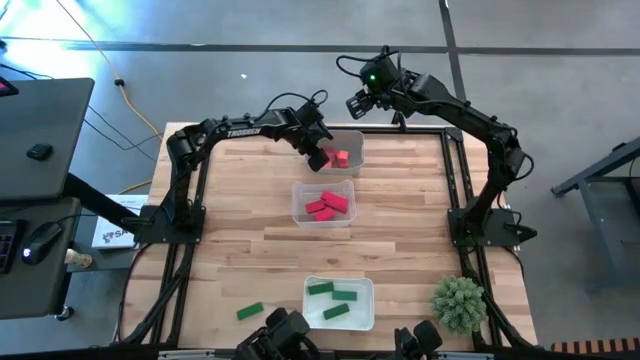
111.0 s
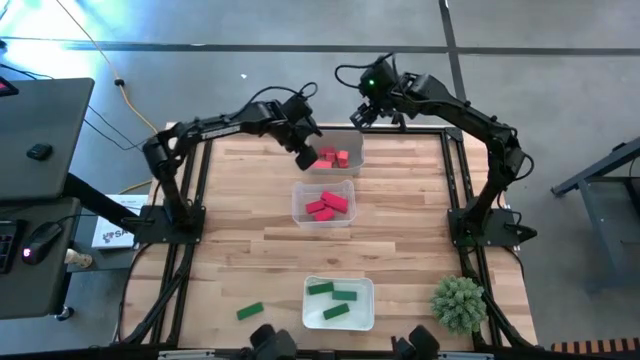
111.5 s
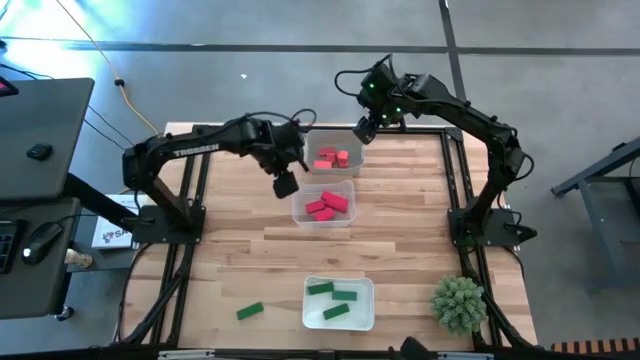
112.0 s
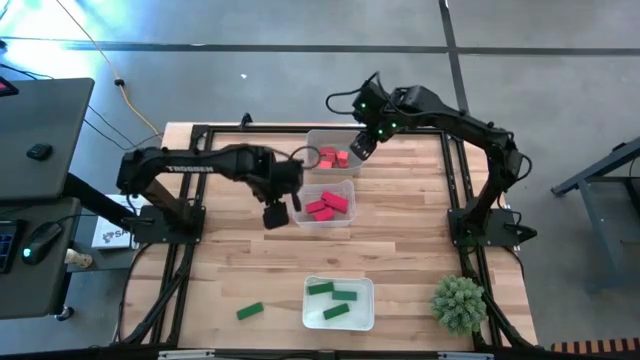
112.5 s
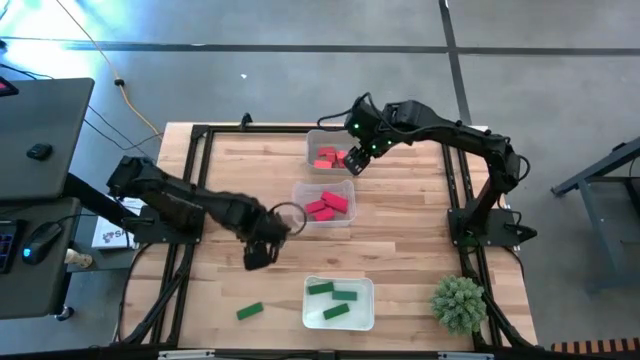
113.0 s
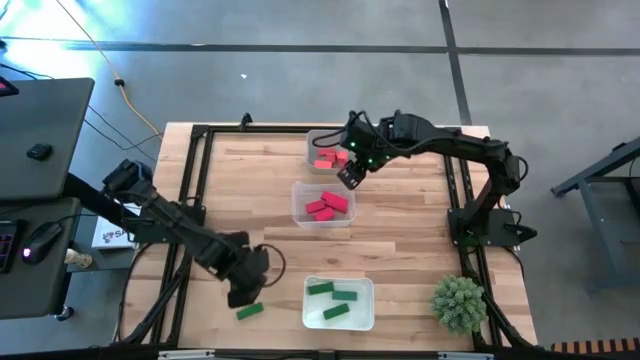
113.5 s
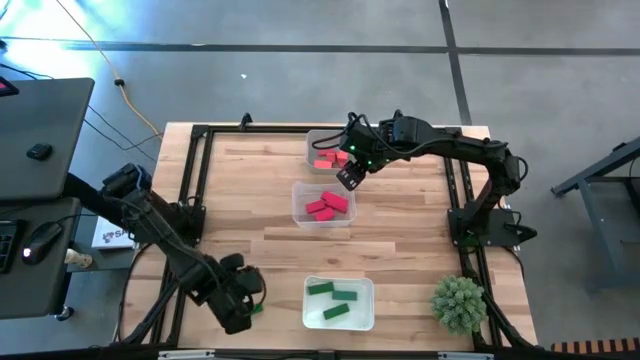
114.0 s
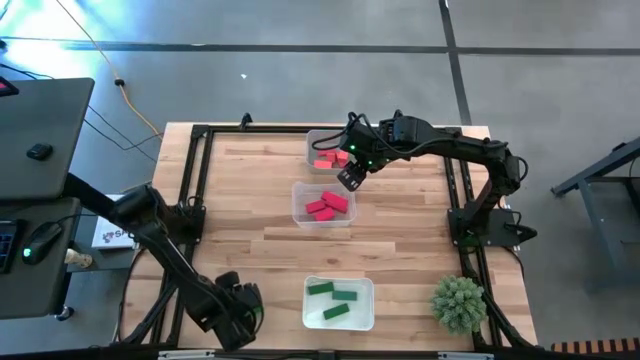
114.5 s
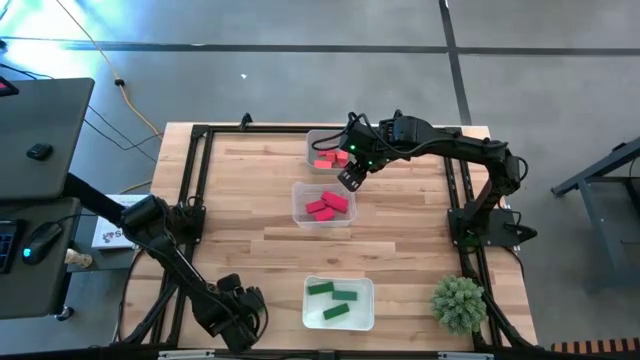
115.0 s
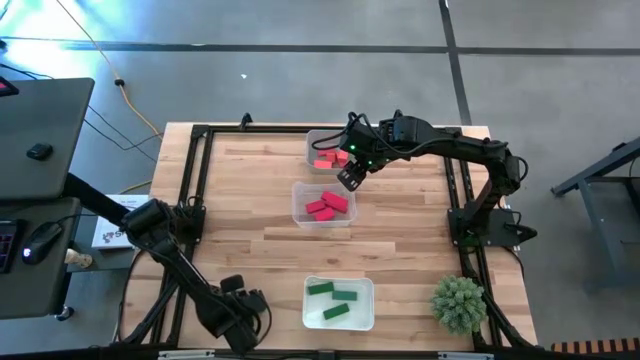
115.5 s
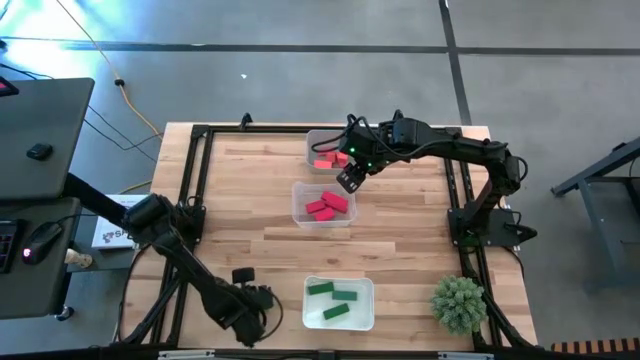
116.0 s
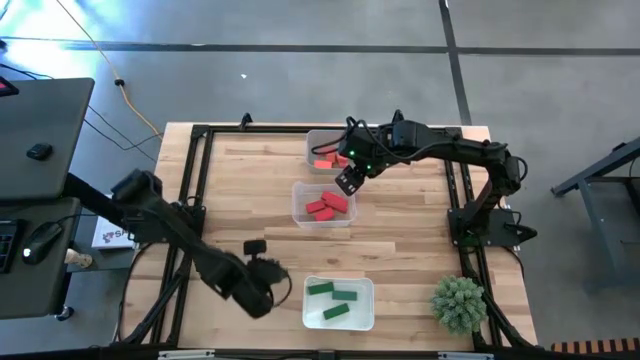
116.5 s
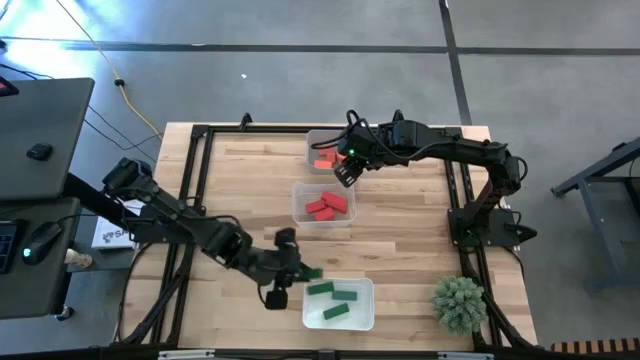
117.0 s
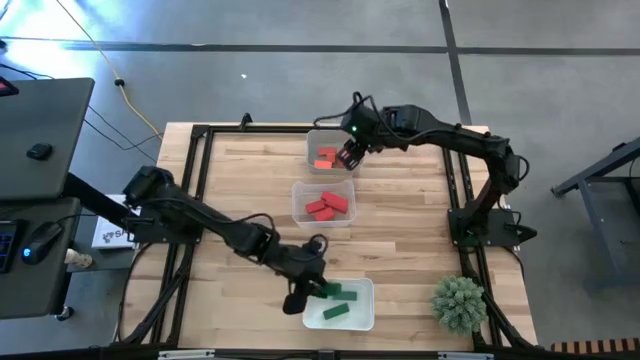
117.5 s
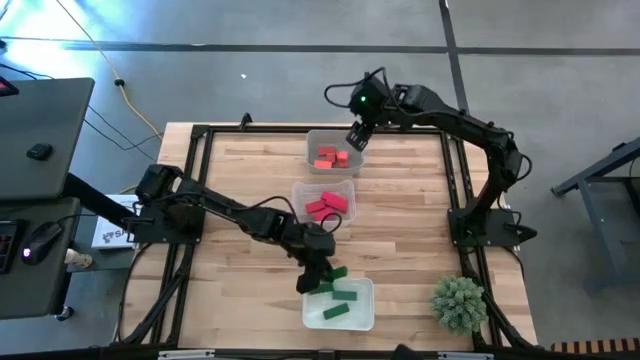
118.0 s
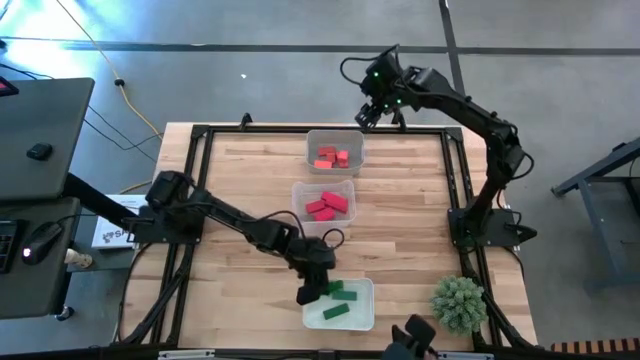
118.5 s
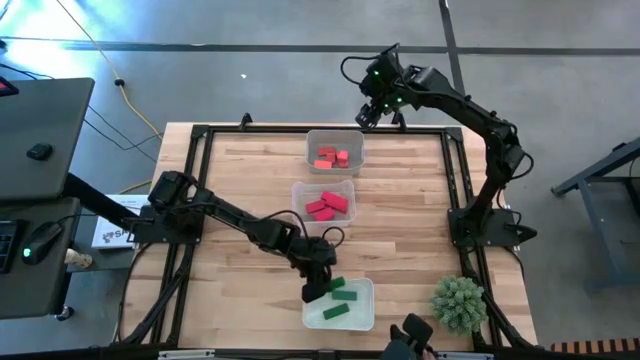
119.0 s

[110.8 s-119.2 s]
Task: Sort & place blocks by color
Put the green block into the white bin

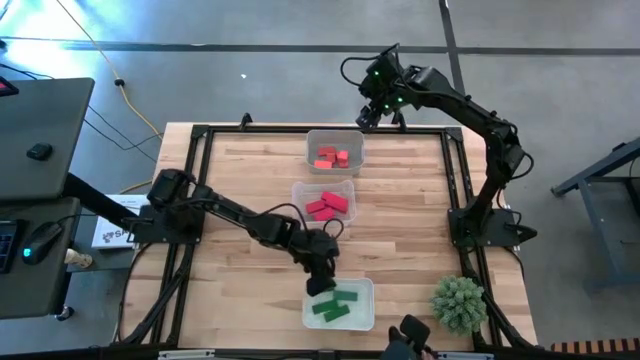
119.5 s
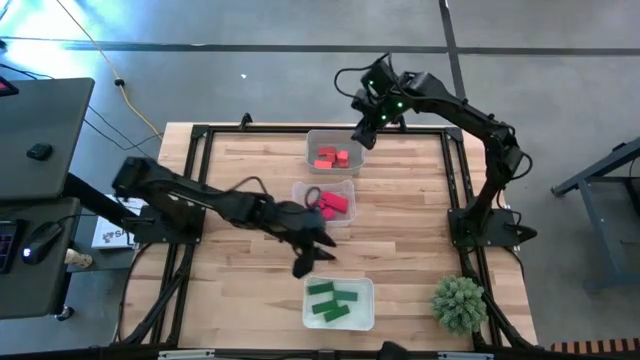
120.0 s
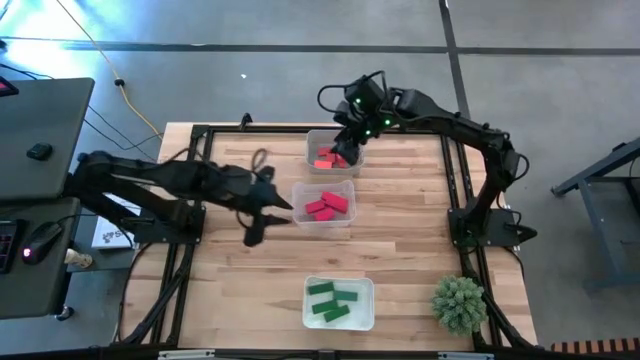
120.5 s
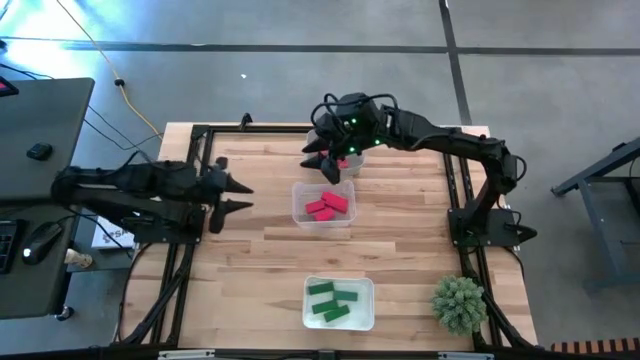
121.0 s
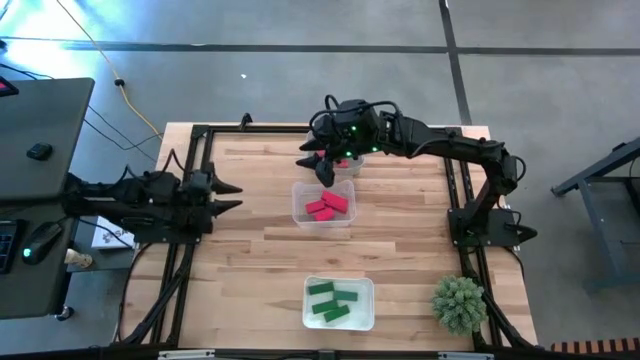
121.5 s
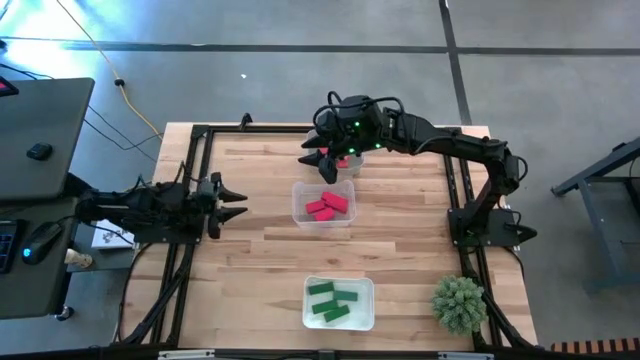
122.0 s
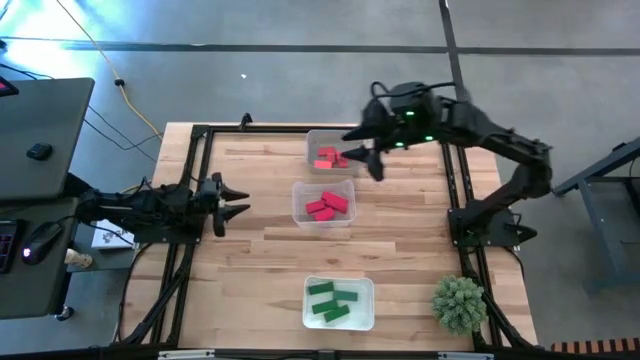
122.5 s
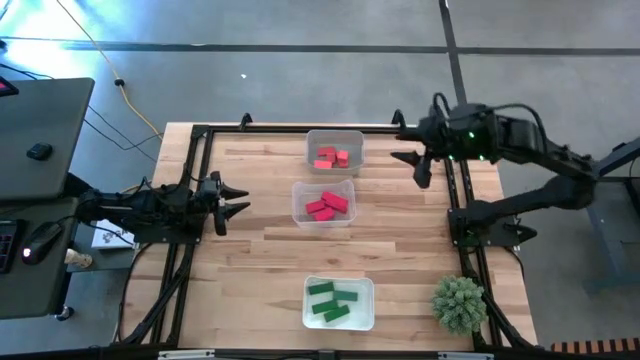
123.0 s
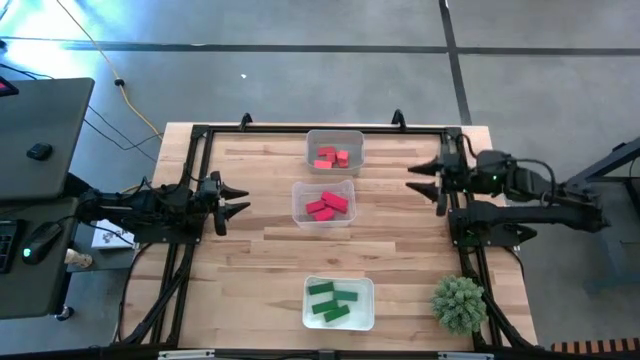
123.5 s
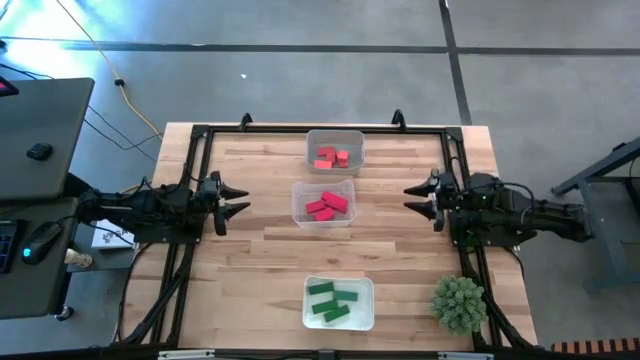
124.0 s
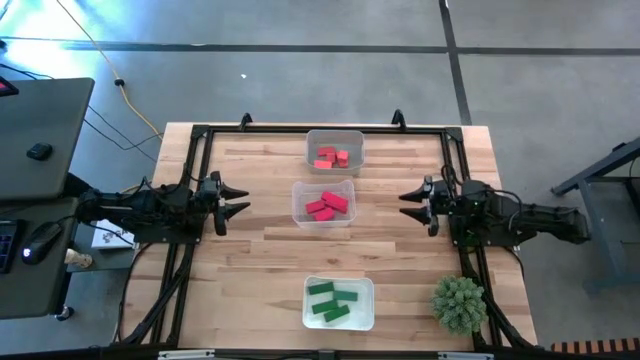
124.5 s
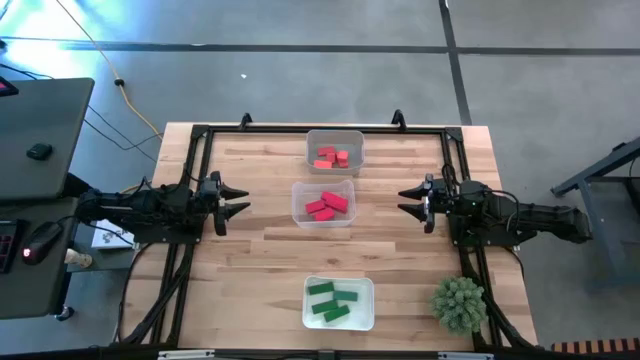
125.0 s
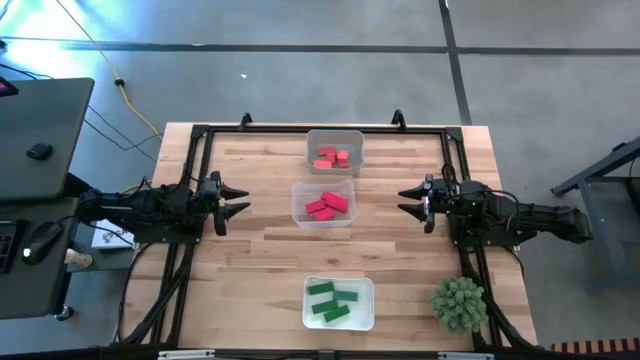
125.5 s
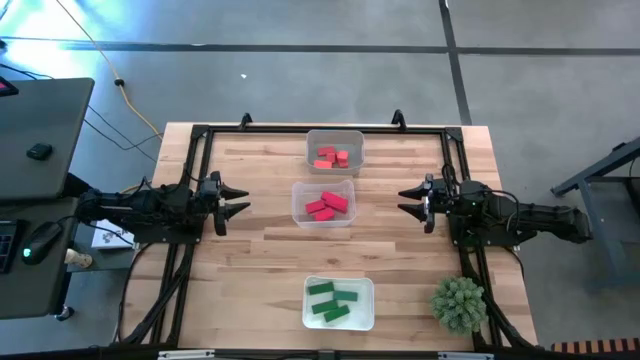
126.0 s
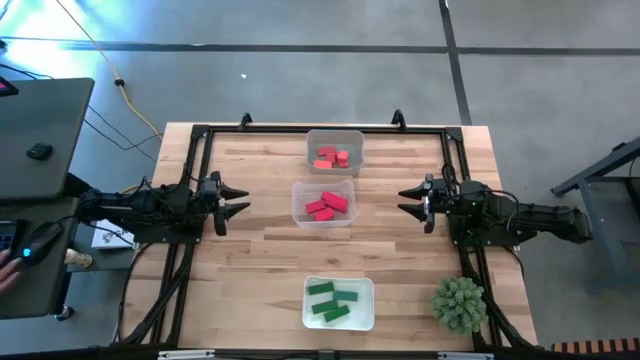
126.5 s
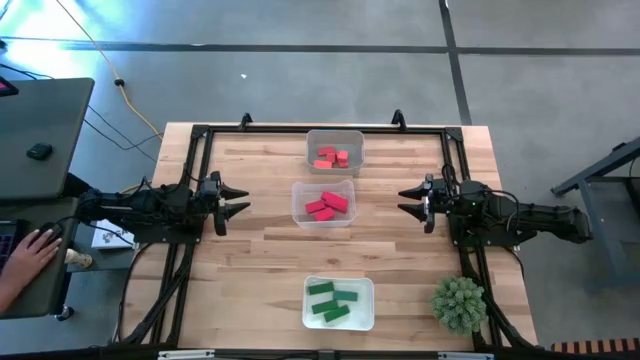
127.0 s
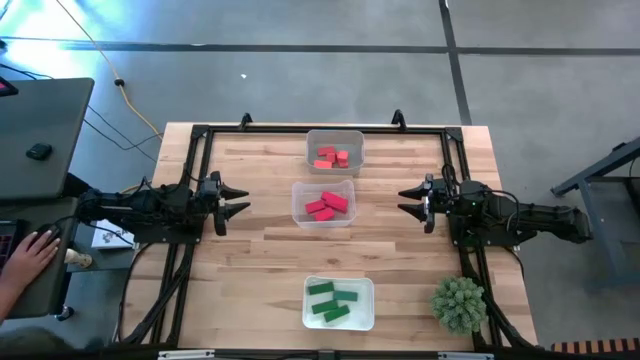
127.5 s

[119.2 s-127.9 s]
Return to Home Position

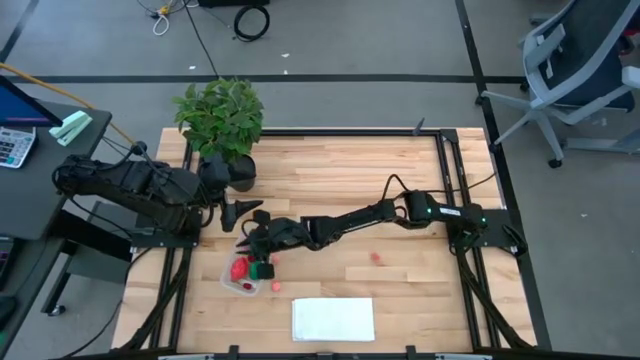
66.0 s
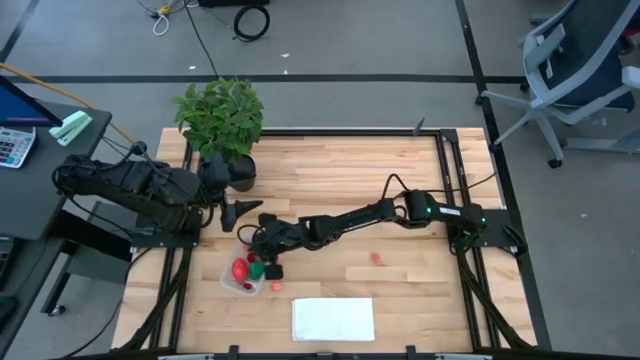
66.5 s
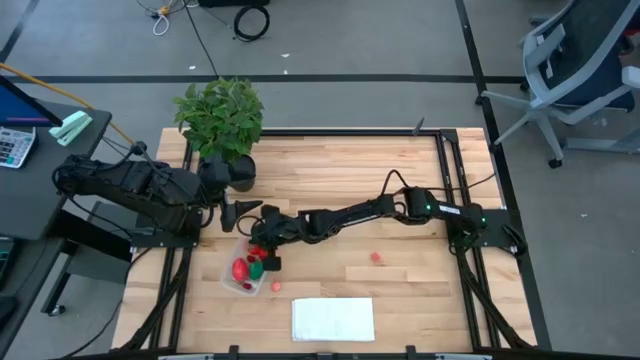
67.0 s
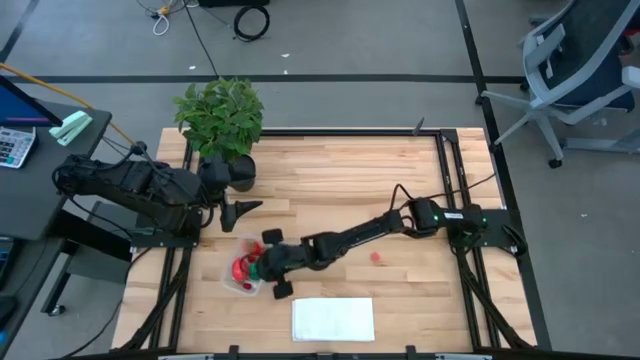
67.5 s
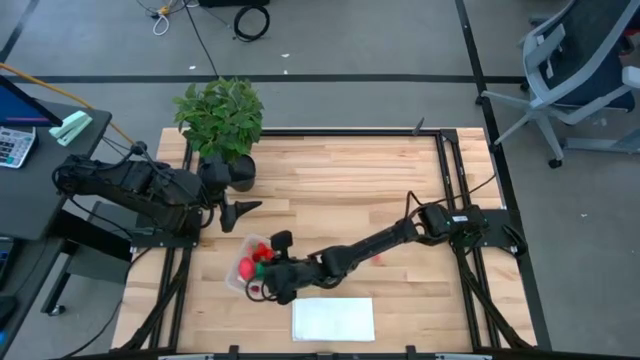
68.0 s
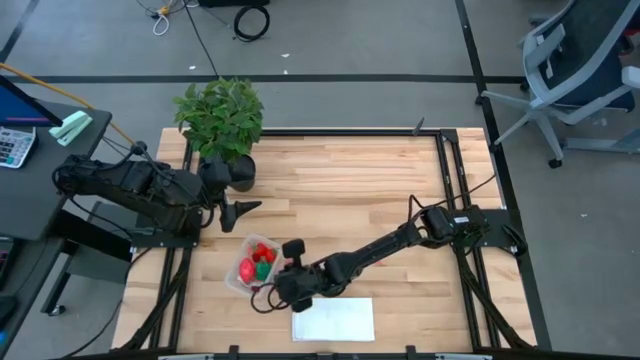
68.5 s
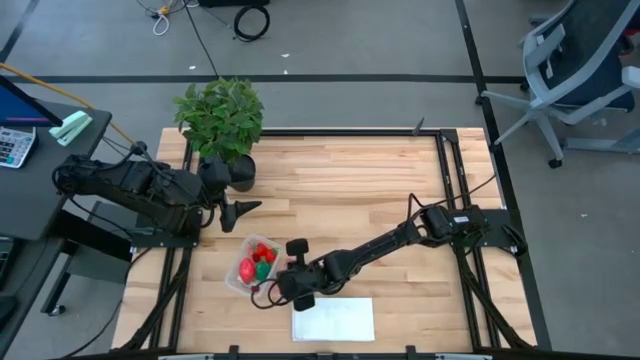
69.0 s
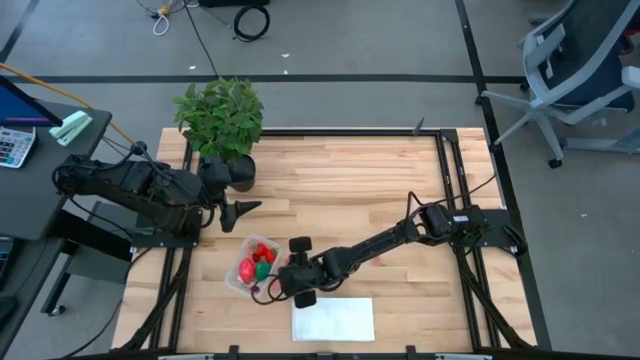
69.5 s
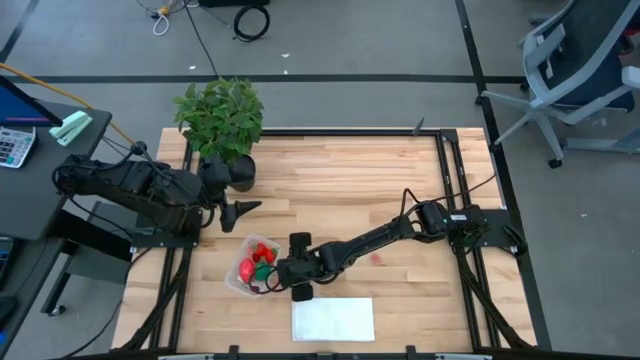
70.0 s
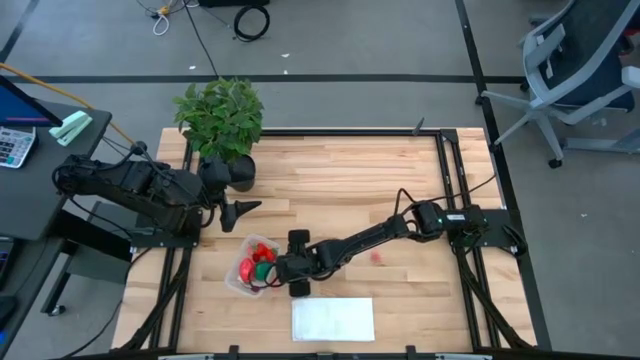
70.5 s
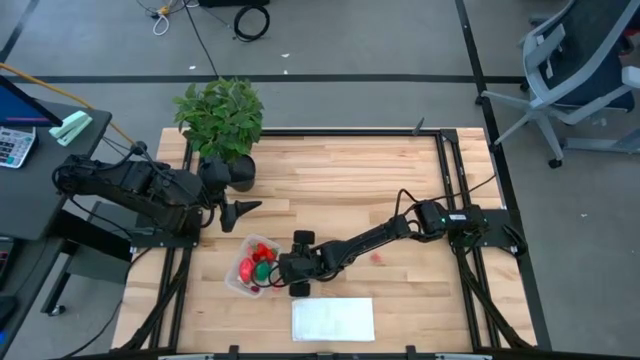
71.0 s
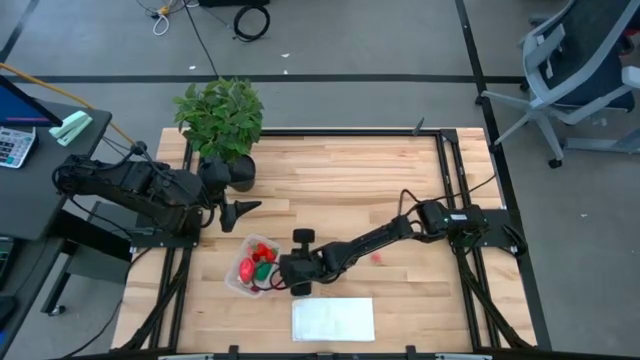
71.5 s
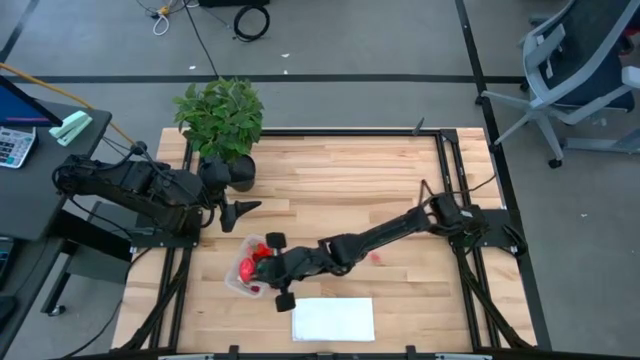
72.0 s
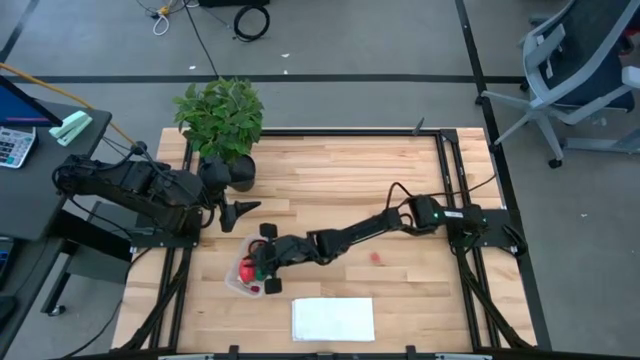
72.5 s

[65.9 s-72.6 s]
Task: Pick and placing Produce into tupperware
Put the pink peach into the transparent bin
